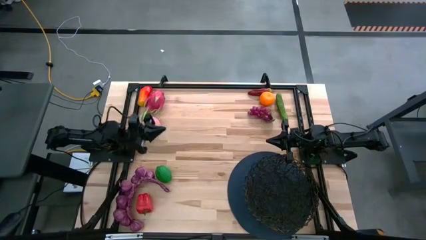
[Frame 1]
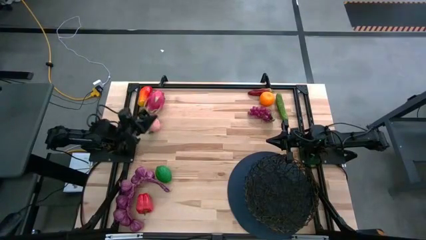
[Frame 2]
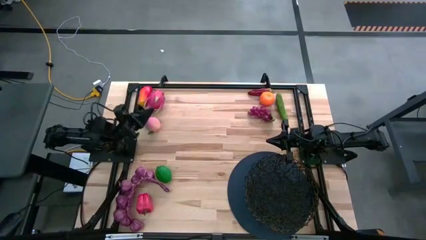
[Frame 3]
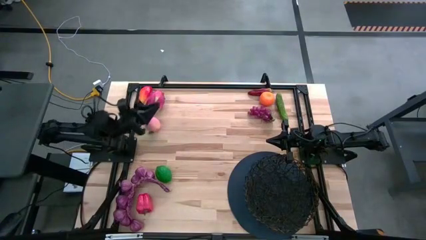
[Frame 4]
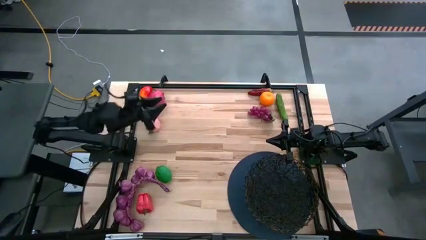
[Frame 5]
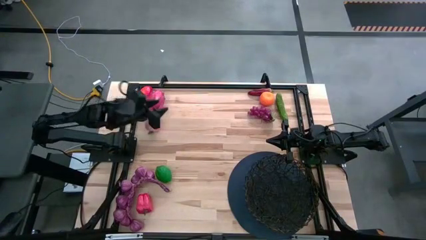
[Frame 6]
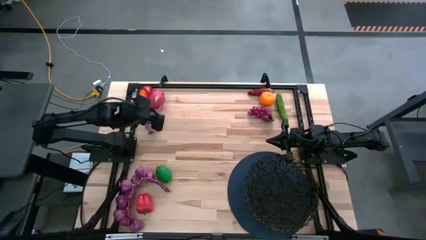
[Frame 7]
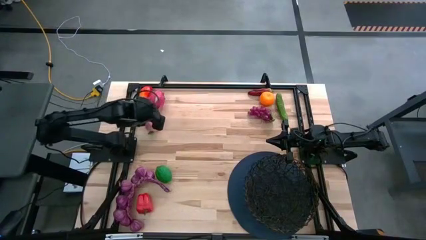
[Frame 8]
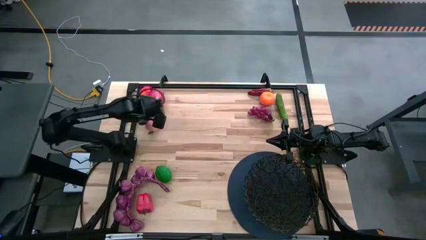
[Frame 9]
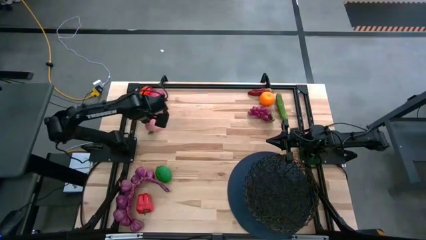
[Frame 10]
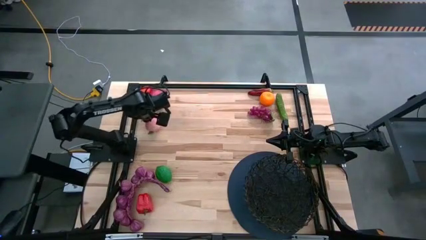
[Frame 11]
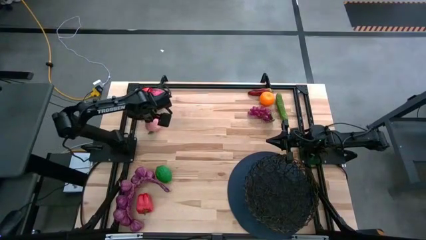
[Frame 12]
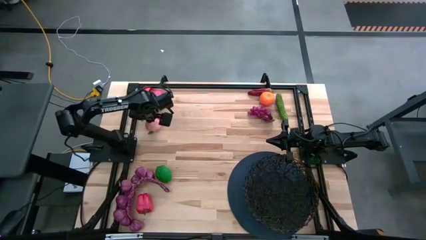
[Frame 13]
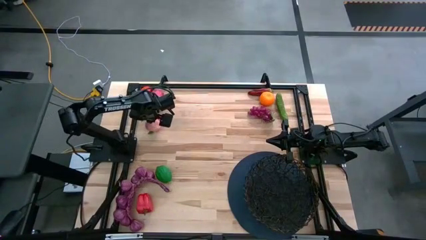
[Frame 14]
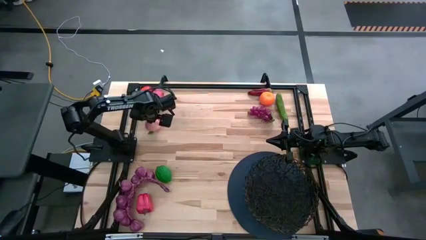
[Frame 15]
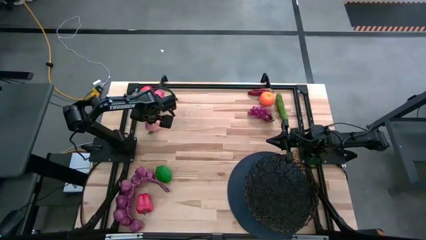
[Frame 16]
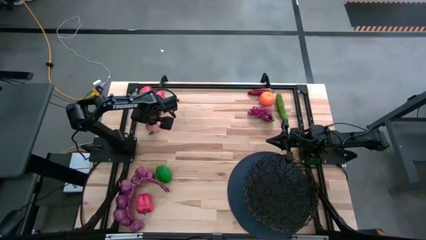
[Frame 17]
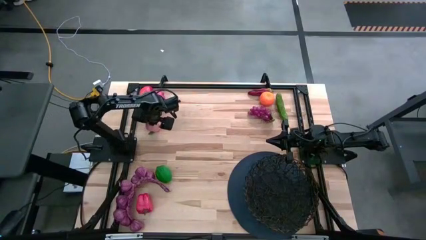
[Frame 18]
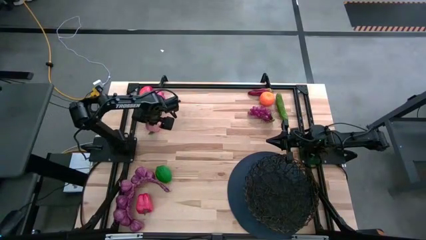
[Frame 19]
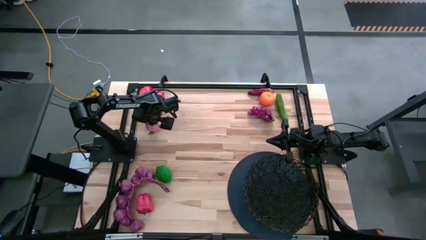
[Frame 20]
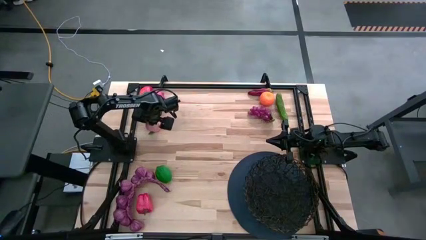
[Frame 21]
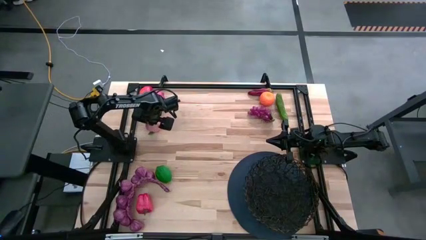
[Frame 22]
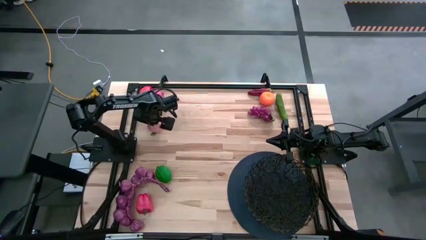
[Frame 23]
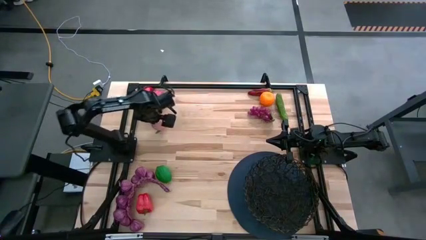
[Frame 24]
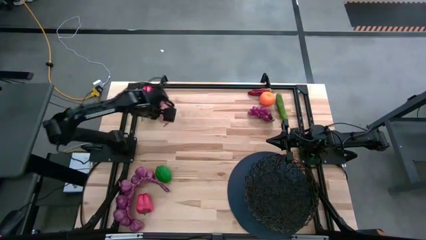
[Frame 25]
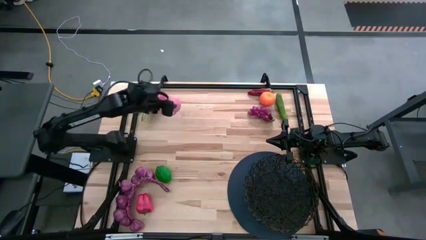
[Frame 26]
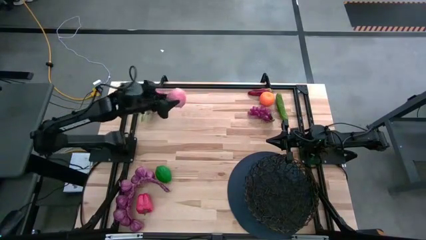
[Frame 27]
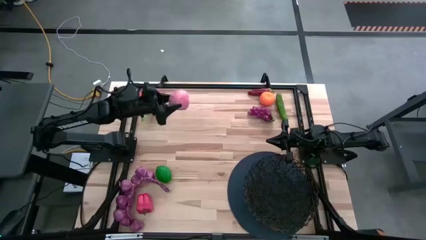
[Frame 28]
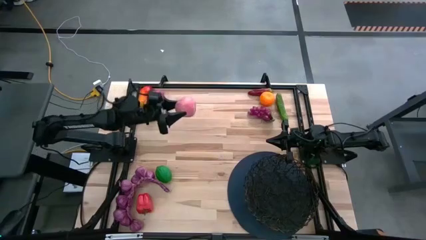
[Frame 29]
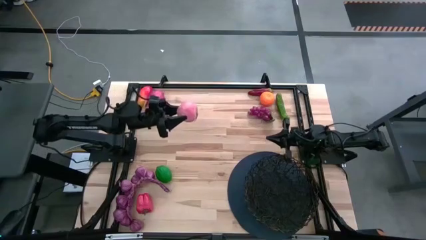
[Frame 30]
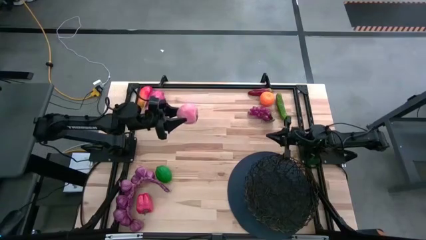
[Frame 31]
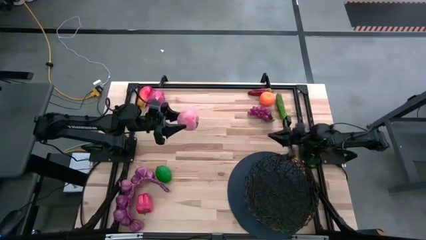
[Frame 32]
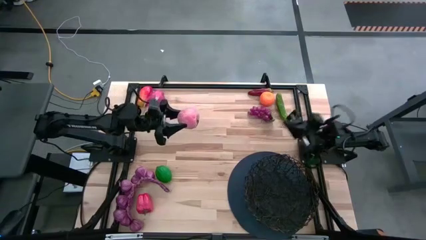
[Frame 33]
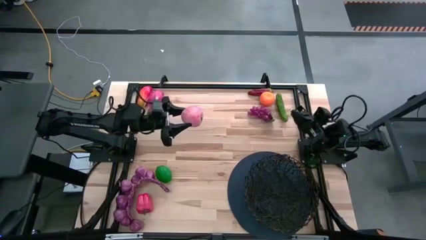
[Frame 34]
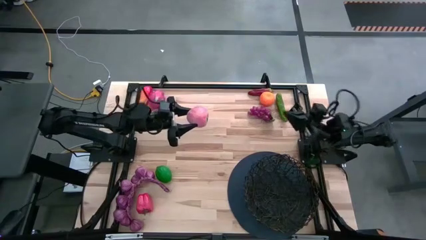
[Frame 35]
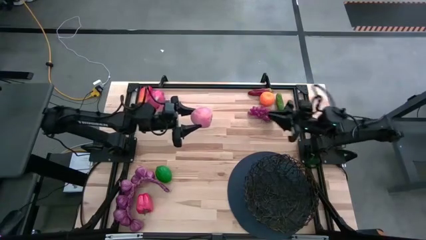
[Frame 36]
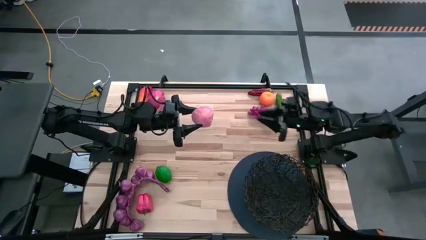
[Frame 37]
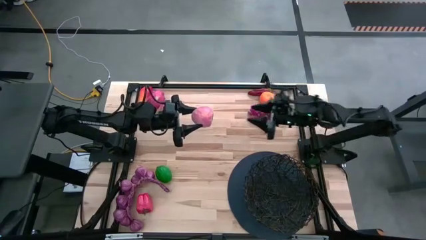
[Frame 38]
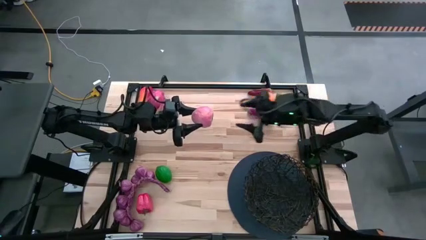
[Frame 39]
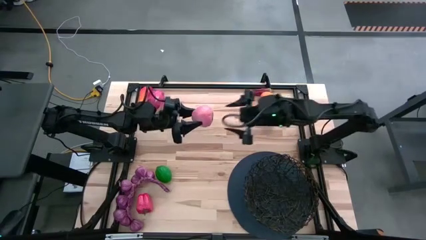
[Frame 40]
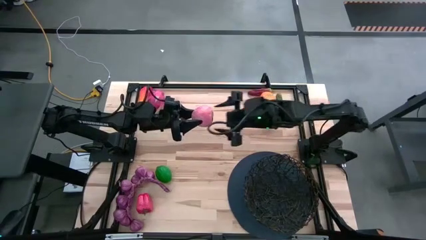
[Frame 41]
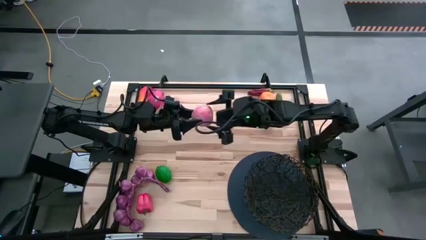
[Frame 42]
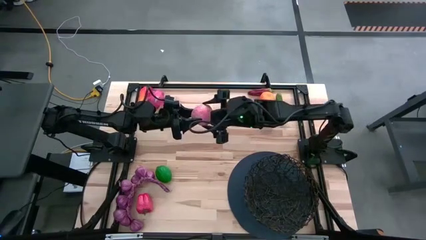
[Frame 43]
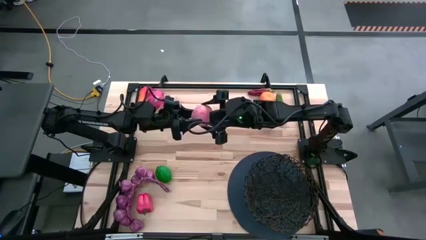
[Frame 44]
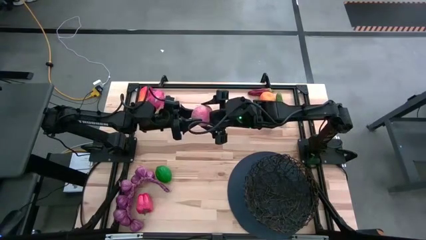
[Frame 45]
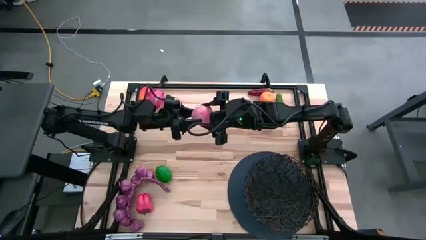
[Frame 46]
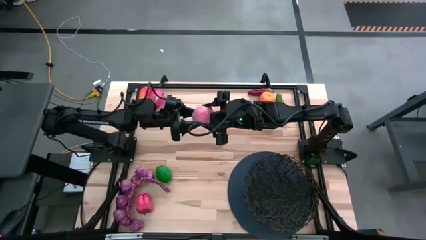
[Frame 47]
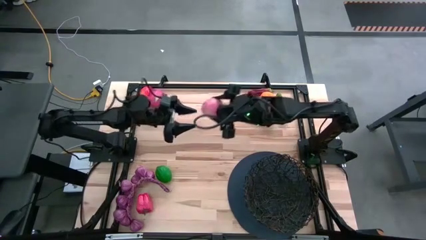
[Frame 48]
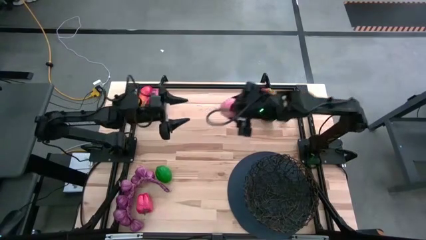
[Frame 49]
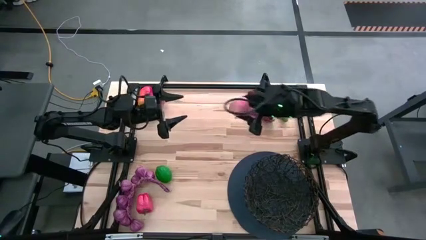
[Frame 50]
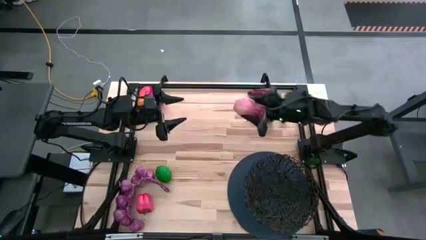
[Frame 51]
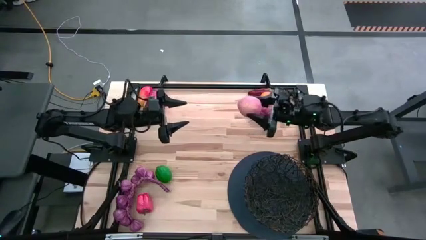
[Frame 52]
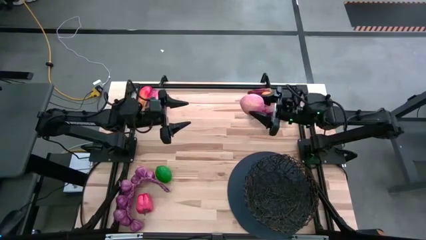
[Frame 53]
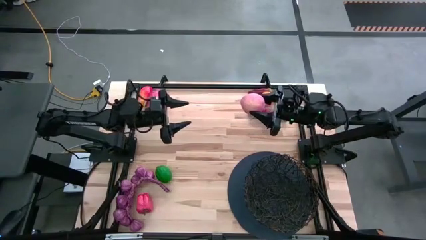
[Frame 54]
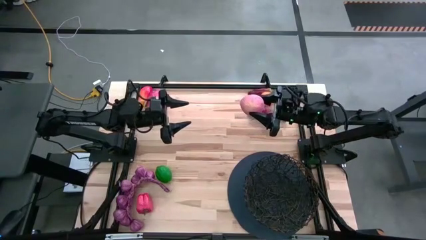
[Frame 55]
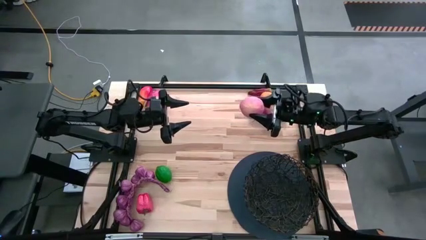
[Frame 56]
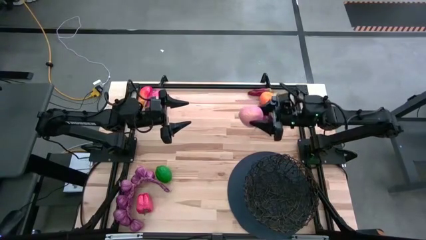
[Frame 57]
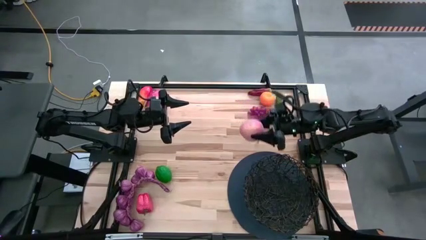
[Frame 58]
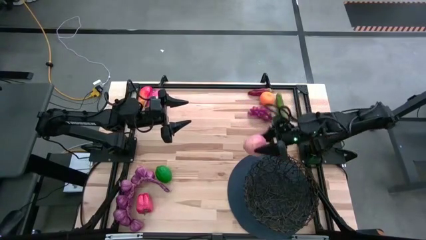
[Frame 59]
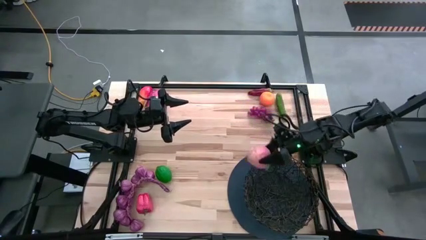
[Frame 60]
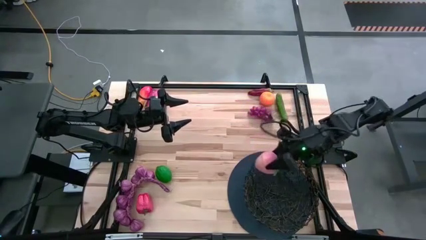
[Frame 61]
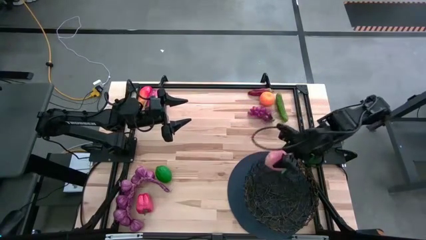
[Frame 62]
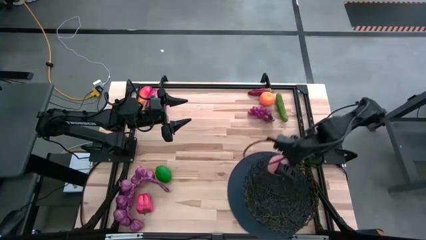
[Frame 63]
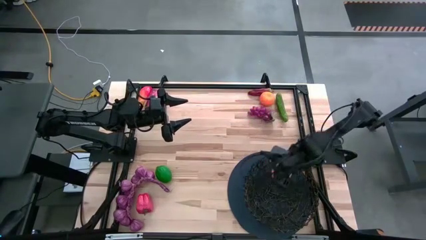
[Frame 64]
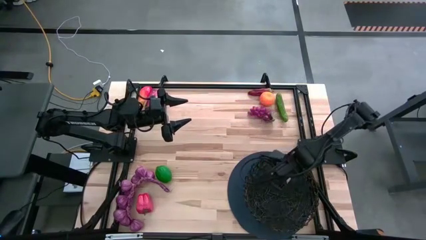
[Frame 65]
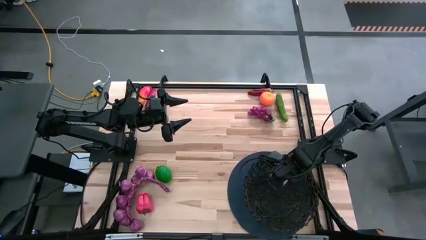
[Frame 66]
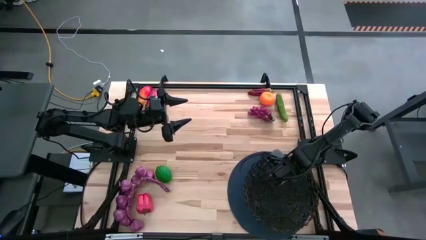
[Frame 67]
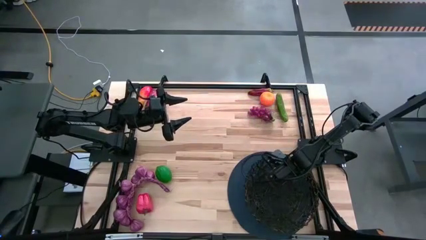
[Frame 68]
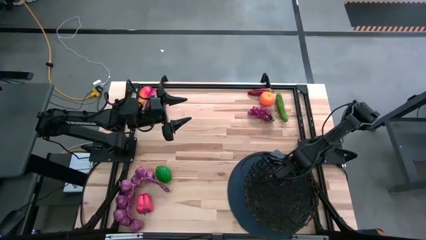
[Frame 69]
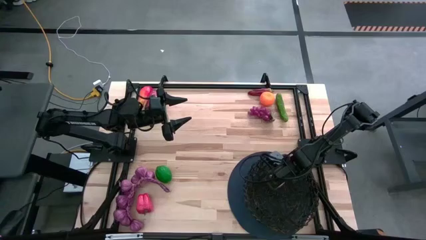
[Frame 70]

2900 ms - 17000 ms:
Task: Build produce basket
Put the pink peach into the basket
